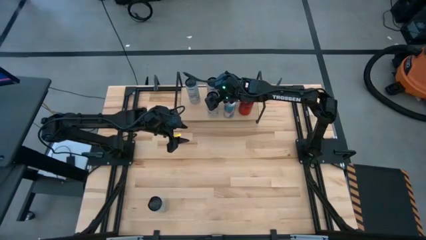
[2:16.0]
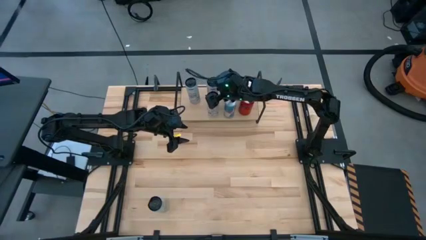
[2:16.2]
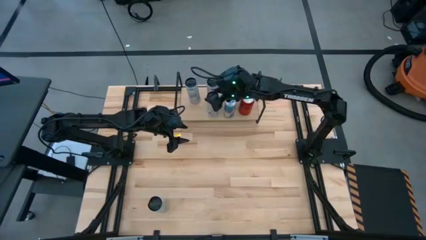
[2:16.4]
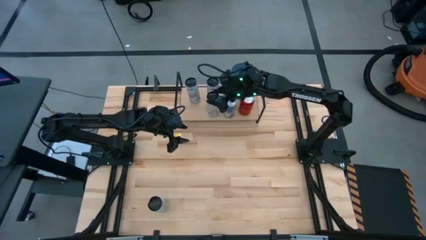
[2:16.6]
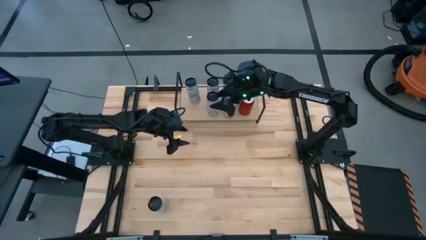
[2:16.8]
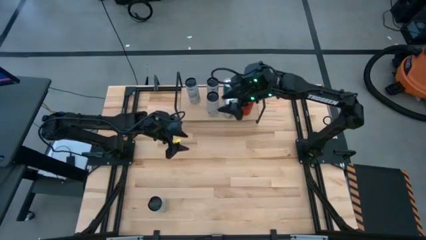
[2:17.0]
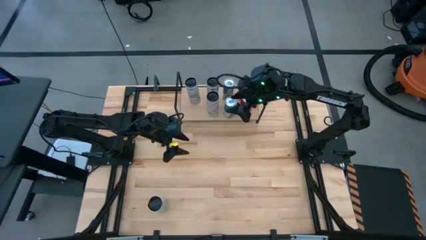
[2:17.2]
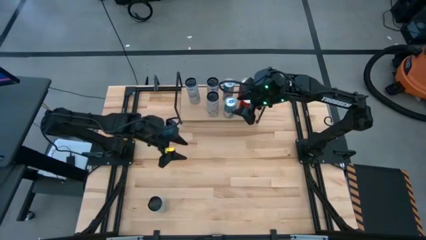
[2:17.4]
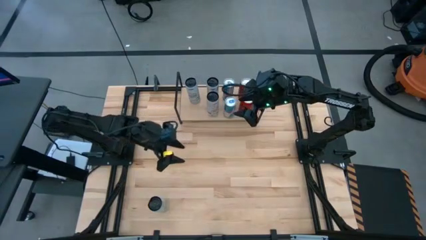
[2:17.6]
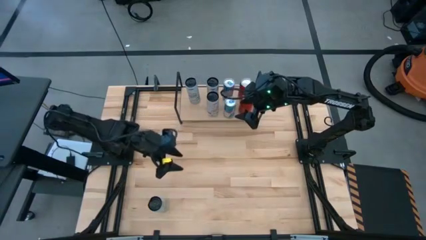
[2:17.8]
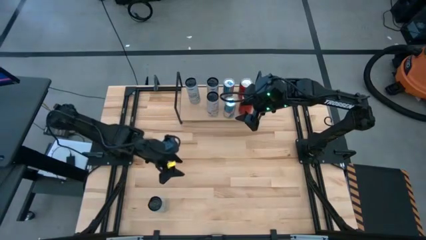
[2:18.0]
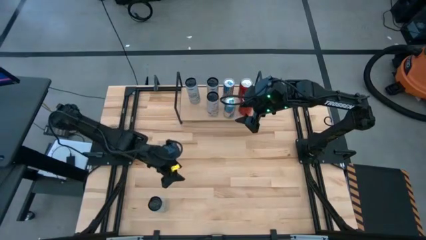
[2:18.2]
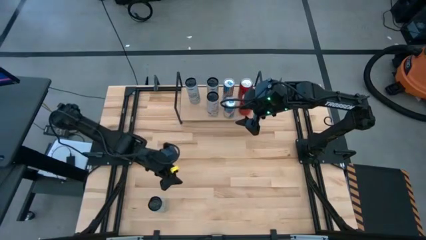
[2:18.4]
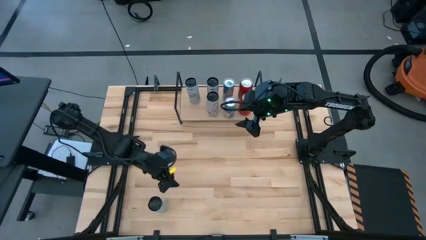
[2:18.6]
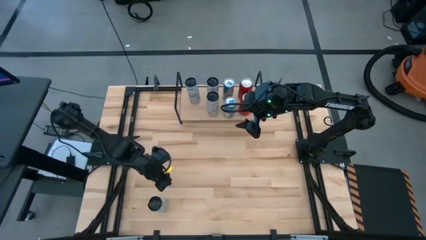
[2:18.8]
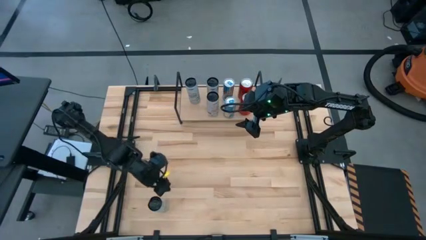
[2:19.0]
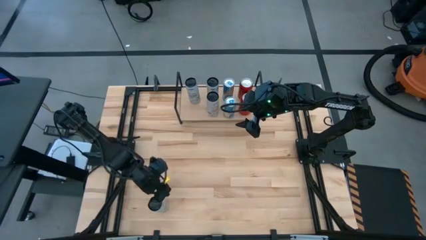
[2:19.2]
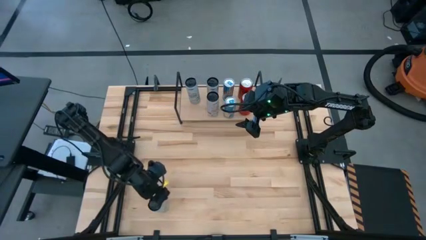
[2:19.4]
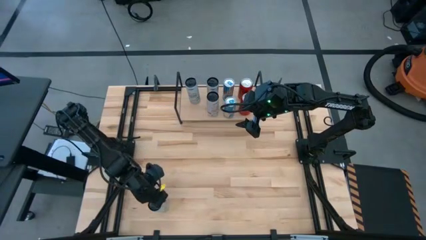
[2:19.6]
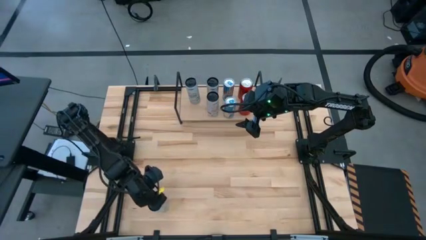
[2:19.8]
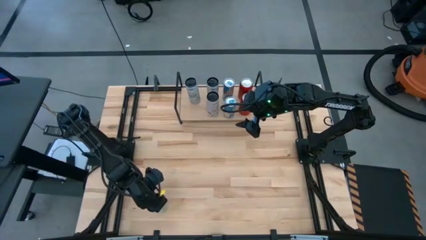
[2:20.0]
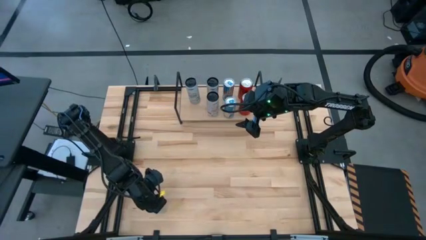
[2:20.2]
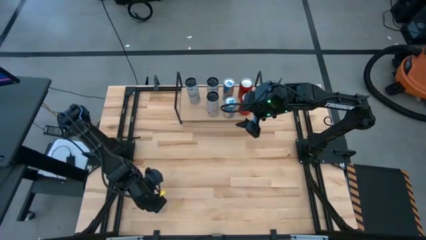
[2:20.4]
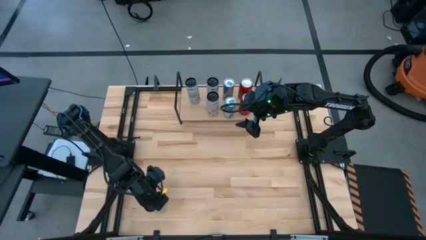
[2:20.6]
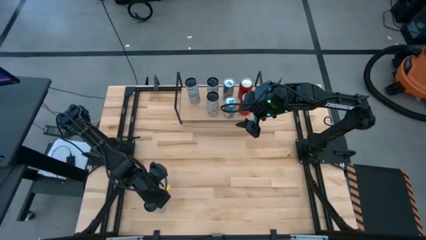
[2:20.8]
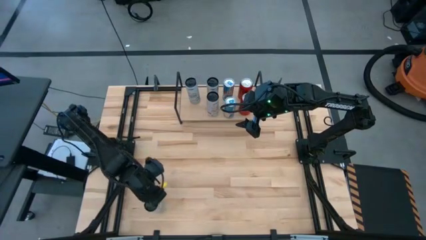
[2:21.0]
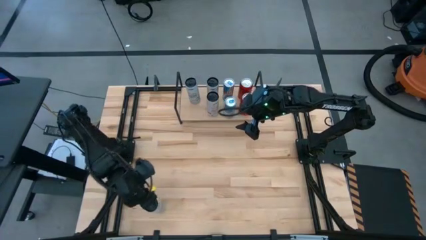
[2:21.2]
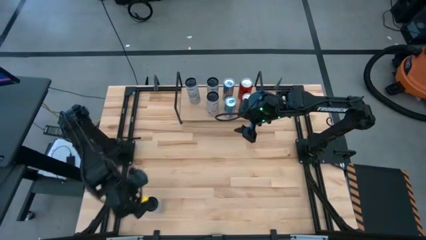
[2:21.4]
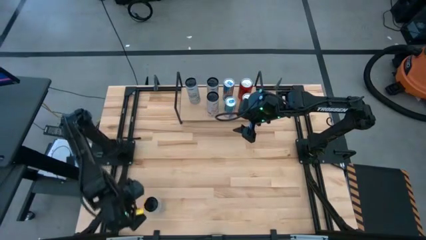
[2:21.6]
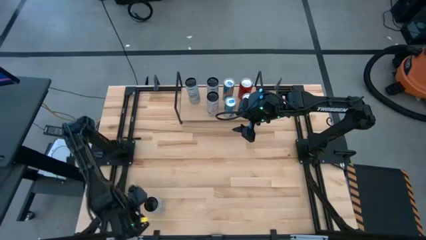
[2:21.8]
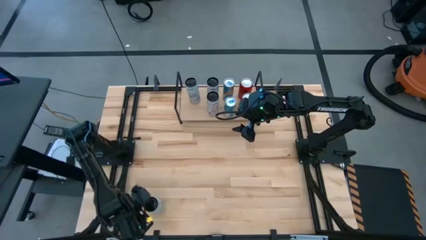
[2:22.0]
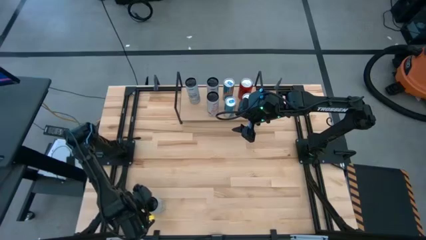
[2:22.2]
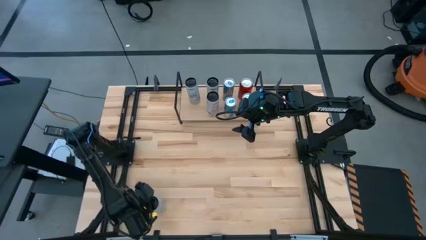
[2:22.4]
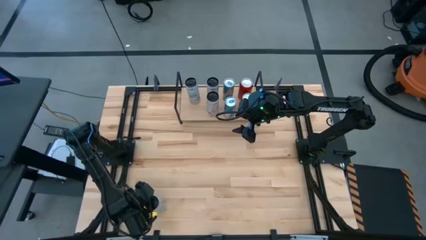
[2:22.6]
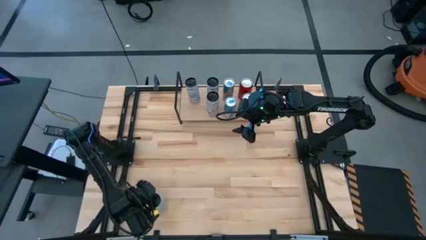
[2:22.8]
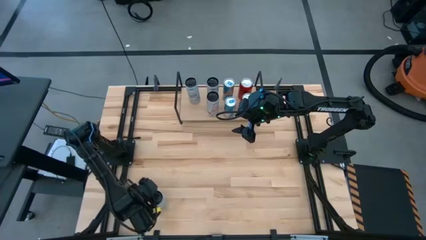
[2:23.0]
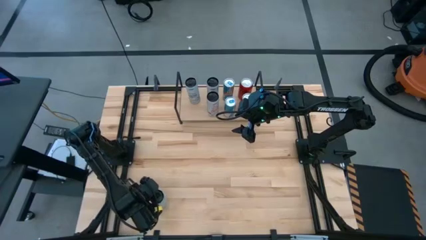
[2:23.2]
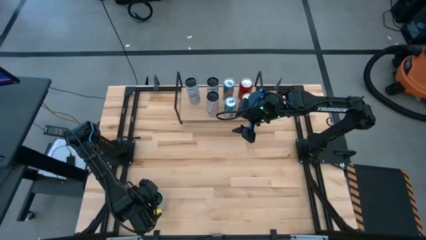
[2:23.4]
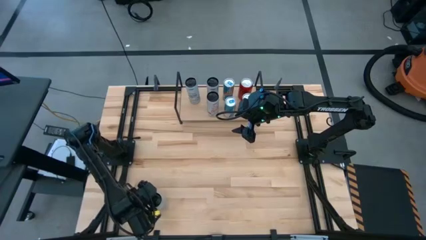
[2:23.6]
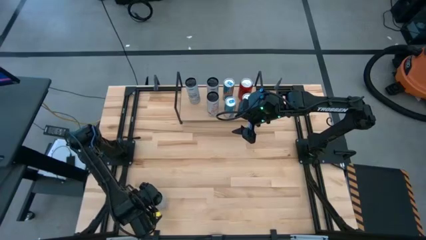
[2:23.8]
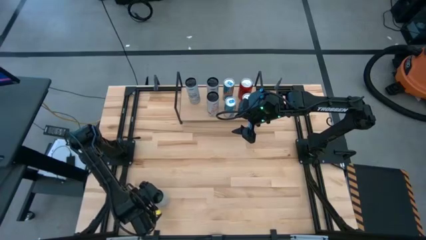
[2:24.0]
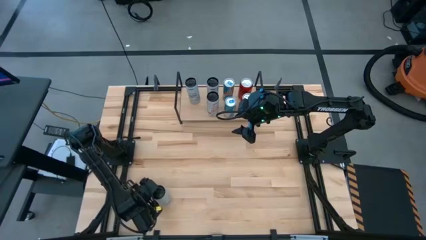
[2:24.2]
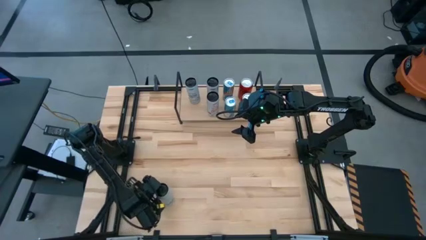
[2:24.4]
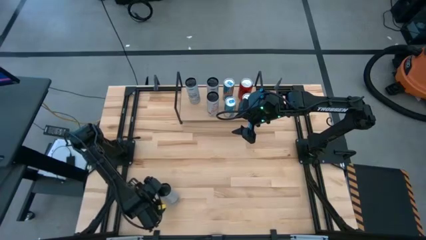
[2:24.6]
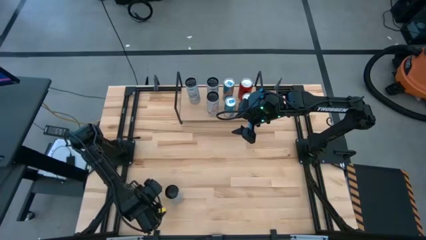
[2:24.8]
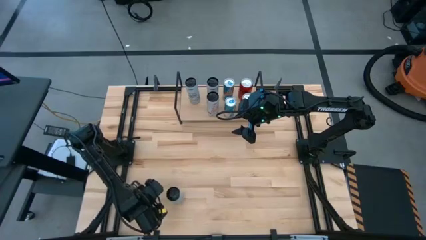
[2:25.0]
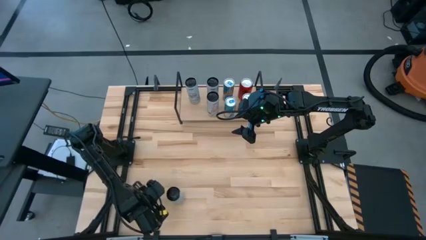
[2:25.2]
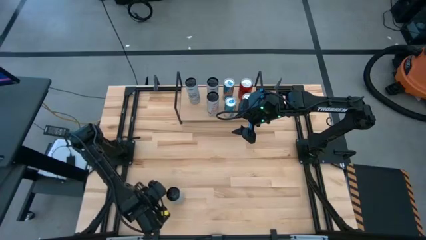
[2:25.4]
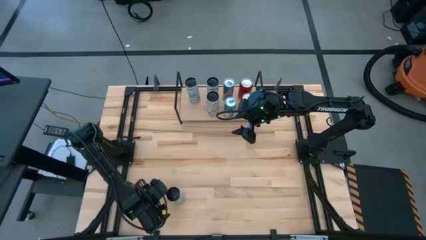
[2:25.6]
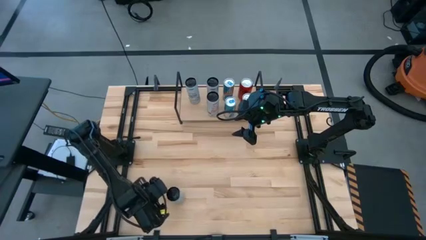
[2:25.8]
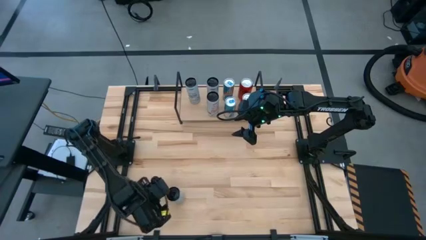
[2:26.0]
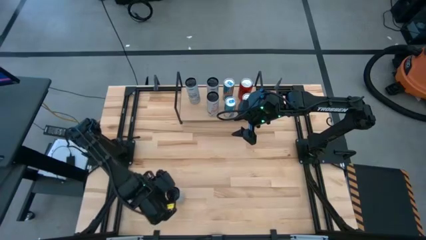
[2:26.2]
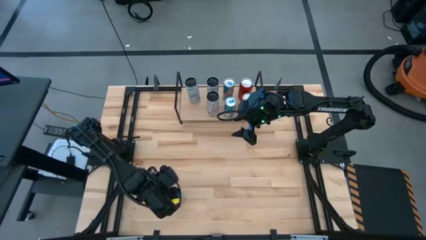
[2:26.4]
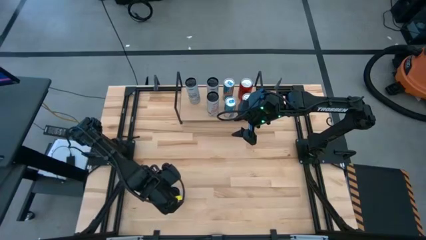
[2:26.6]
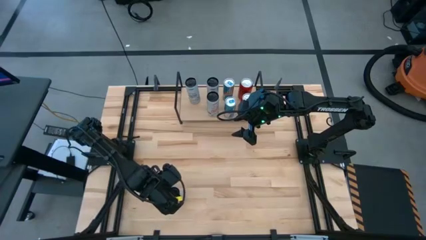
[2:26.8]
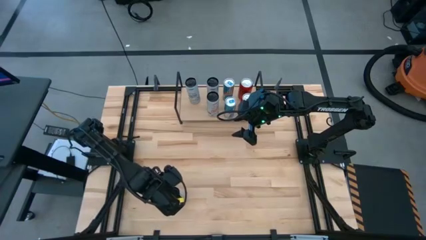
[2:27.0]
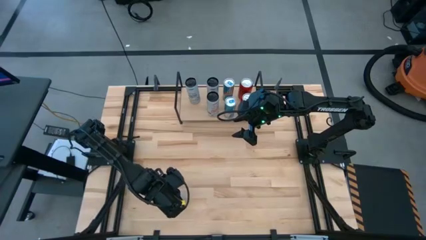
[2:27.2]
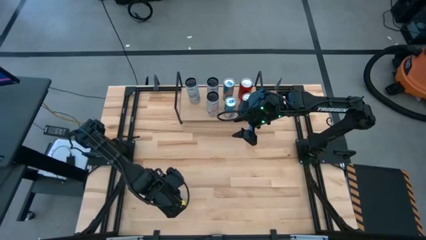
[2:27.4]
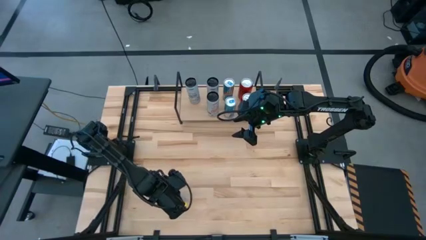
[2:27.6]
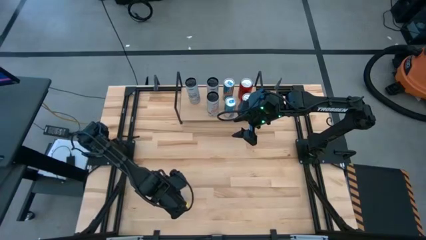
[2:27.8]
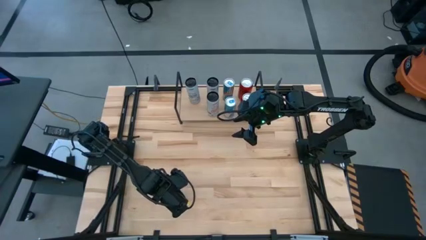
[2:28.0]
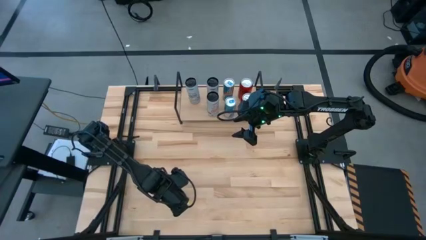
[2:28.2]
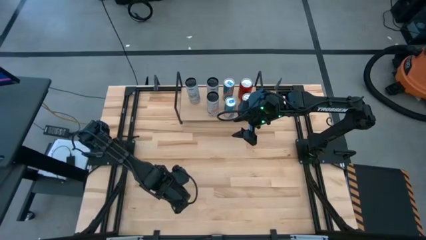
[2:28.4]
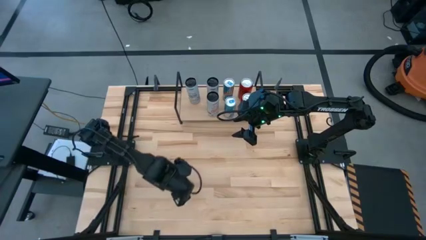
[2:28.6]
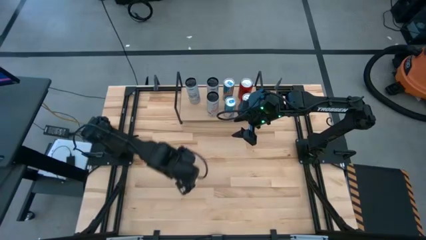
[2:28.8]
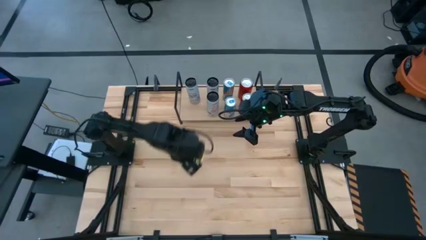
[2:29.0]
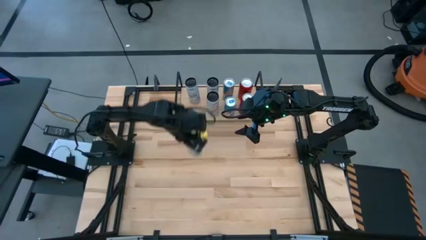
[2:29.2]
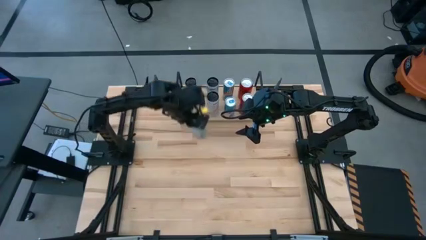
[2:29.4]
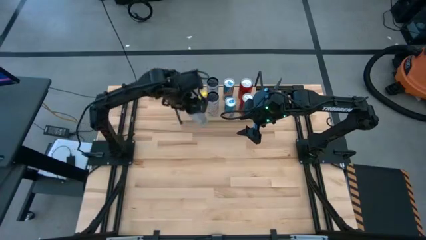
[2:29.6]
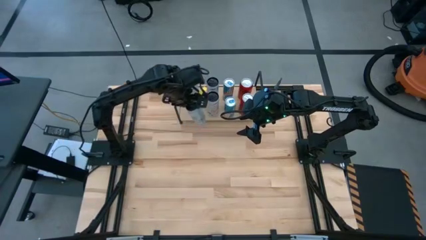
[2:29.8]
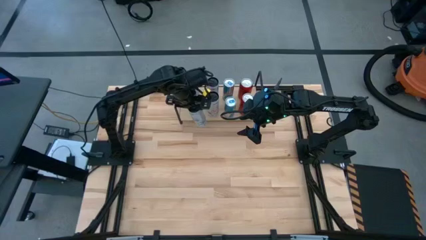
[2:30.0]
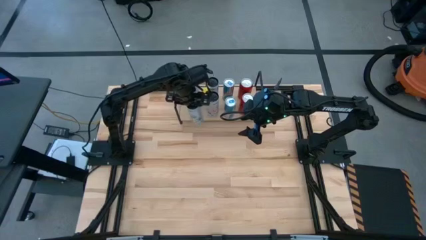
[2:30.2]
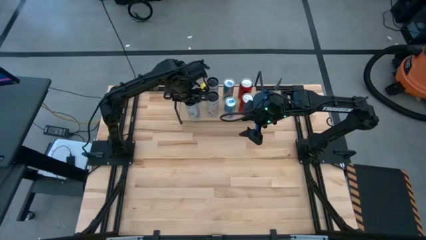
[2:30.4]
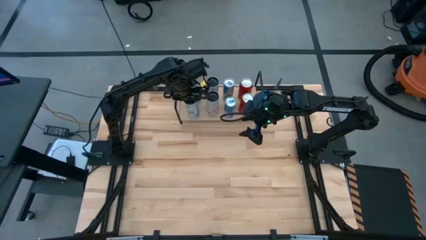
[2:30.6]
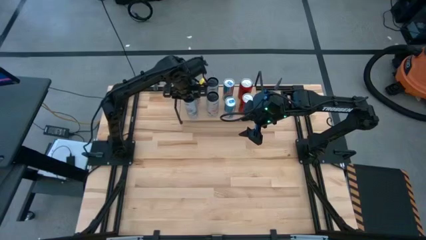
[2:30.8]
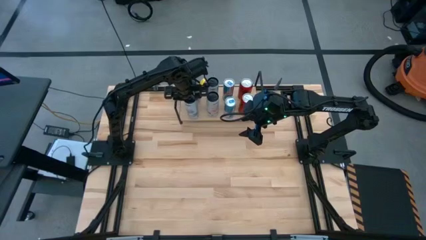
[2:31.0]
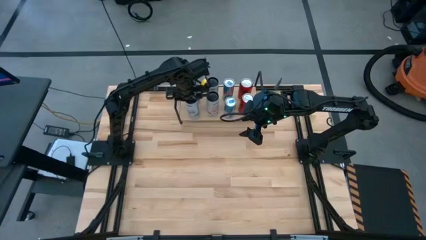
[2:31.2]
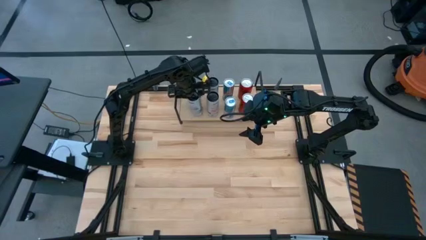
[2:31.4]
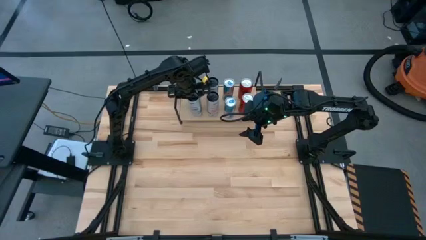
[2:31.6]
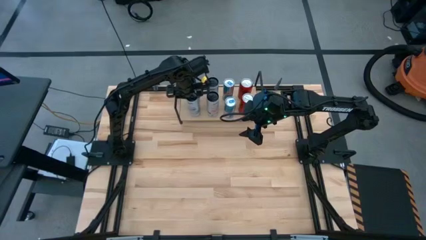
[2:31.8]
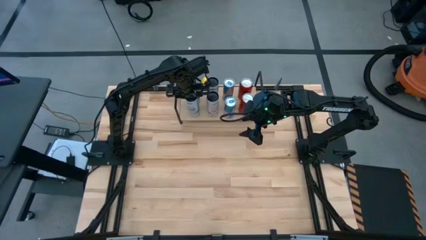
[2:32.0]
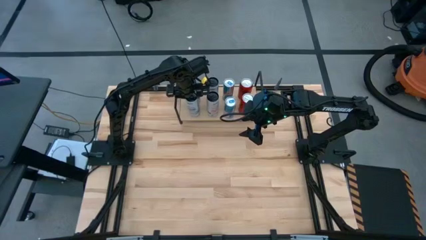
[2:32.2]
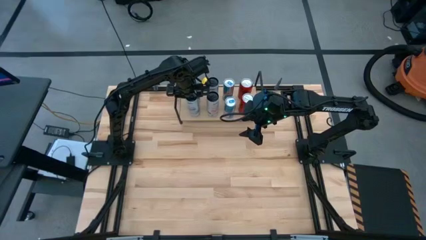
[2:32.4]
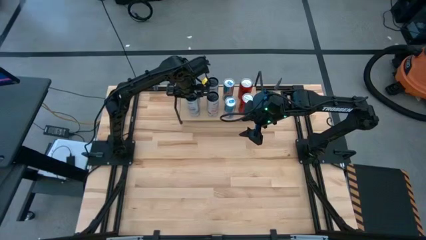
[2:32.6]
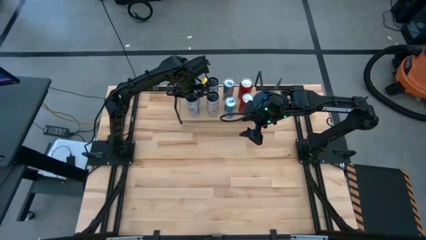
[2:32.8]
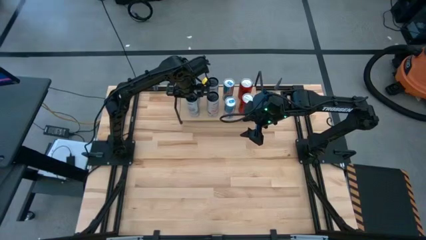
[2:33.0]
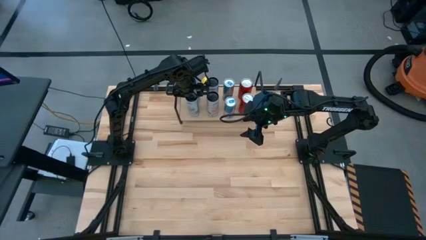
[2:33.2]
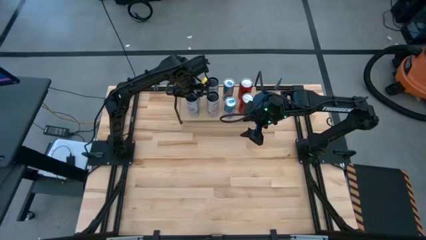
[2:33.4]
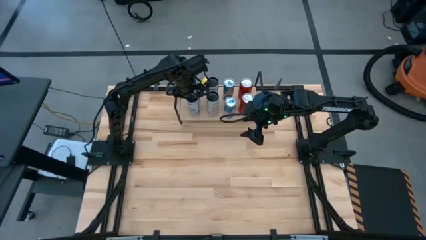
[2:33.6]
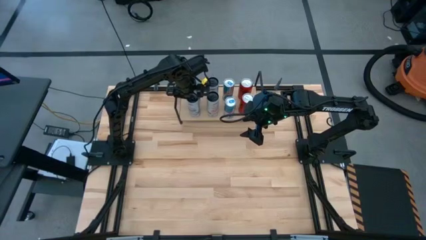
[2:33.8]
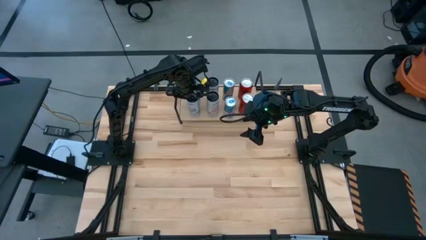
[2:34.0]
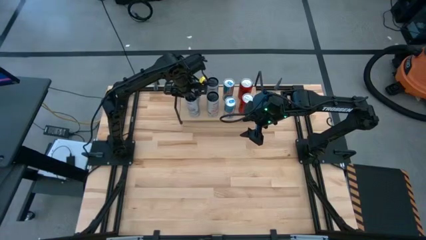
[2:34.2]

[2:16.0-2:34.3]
Task: Place canned beverage on shelf
Put the white and blue soda can on the shelf aligned with the other white and blue soda can
